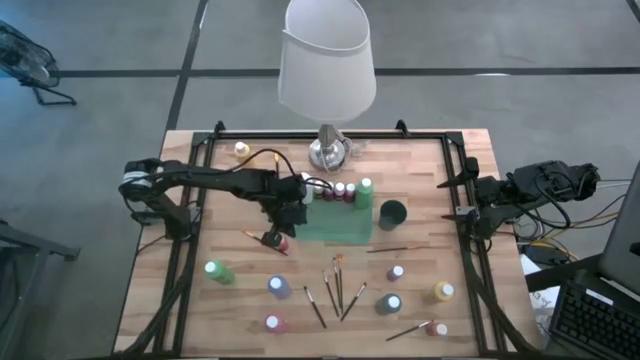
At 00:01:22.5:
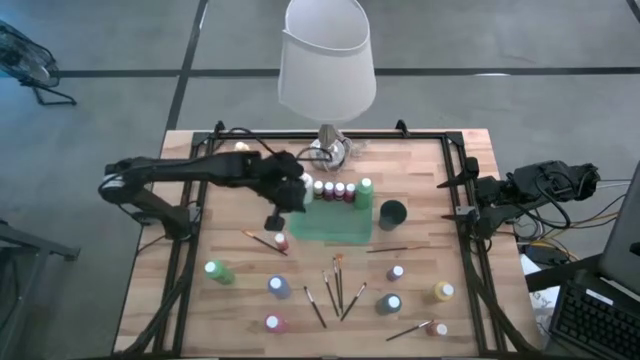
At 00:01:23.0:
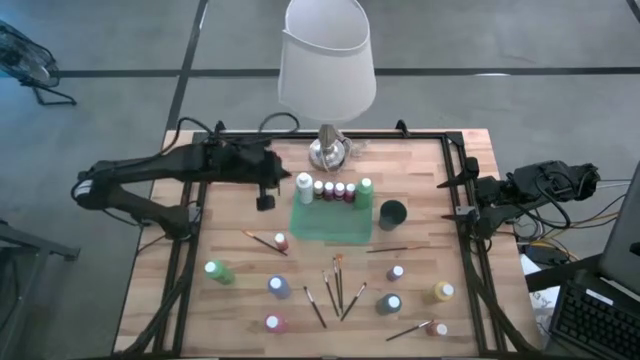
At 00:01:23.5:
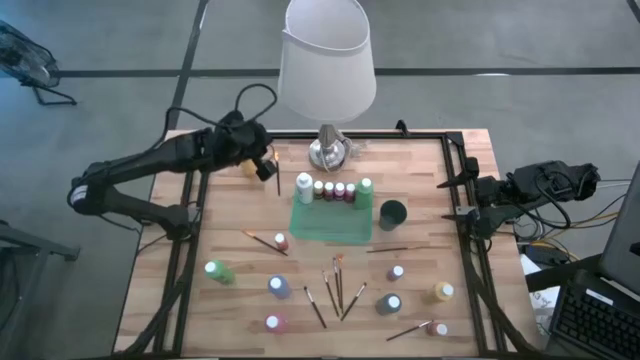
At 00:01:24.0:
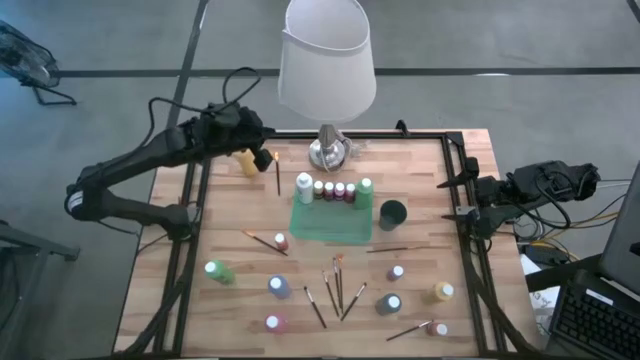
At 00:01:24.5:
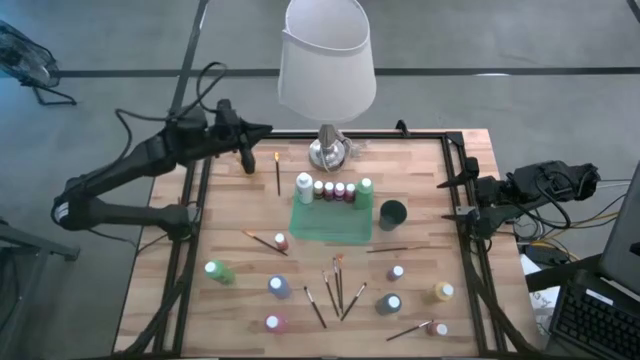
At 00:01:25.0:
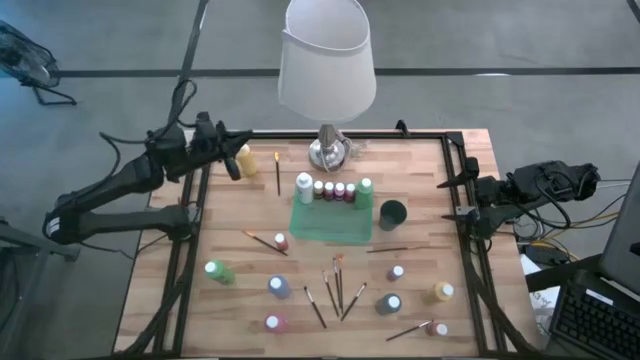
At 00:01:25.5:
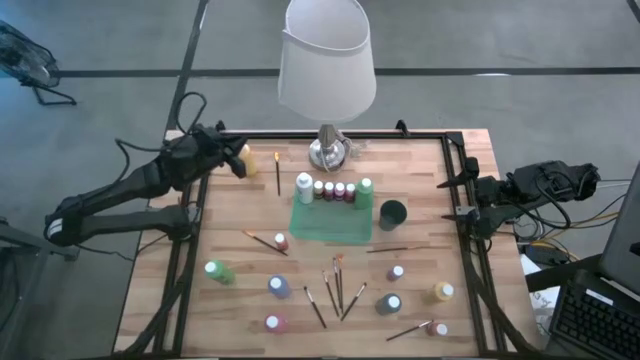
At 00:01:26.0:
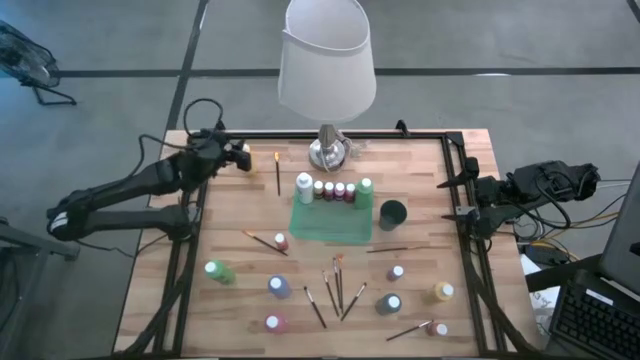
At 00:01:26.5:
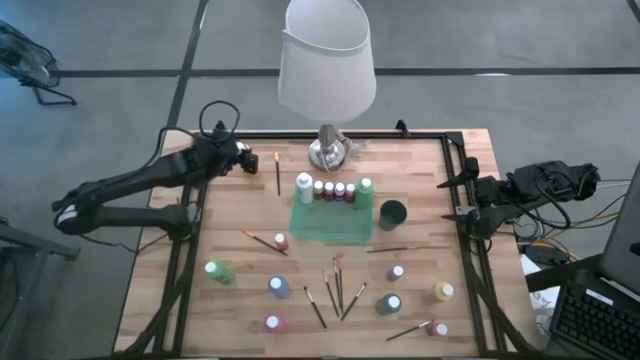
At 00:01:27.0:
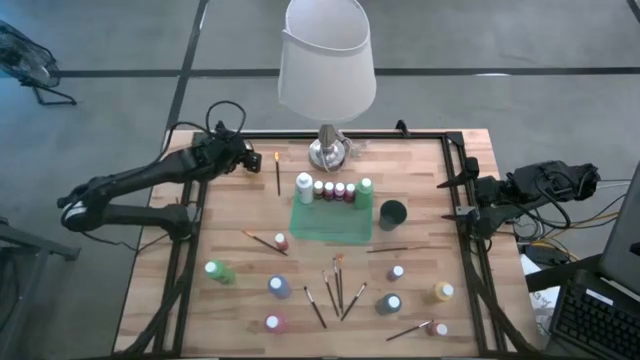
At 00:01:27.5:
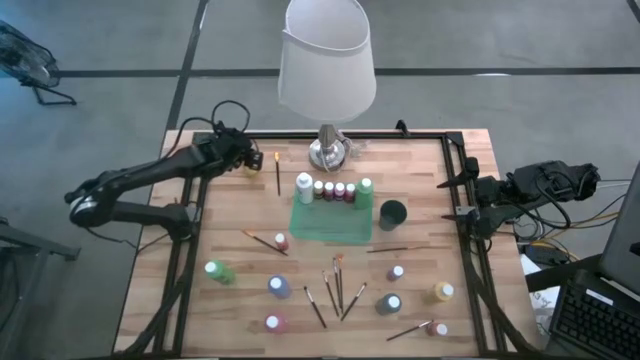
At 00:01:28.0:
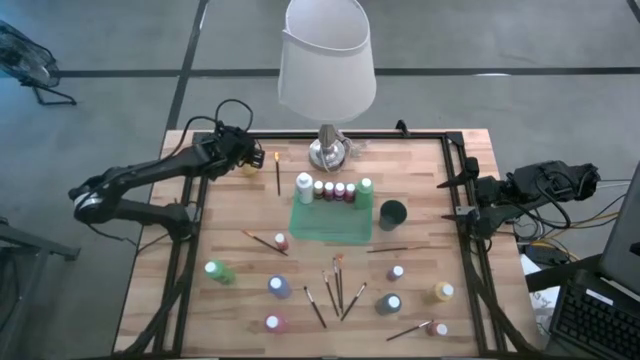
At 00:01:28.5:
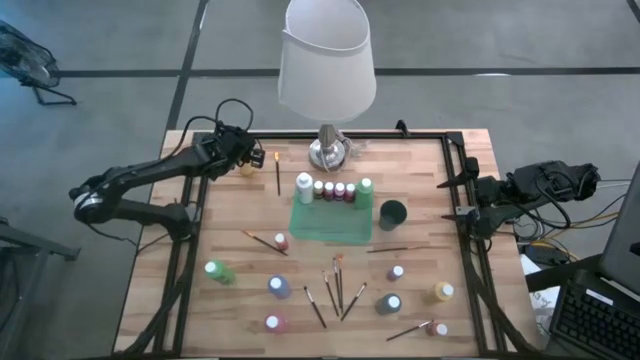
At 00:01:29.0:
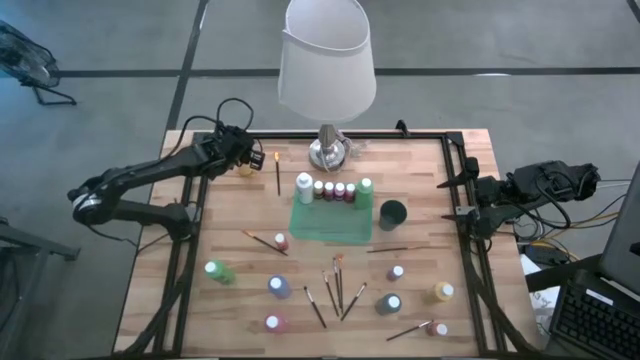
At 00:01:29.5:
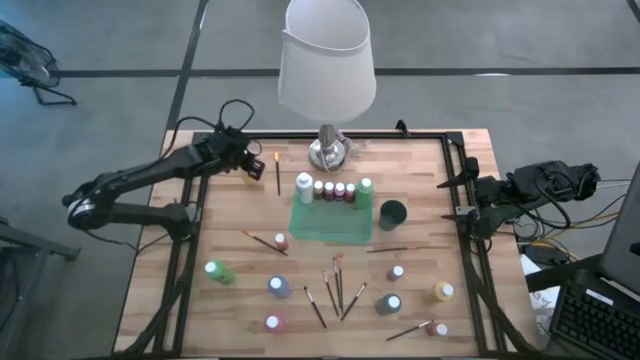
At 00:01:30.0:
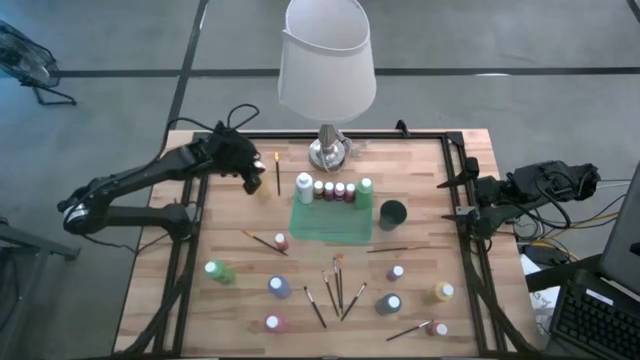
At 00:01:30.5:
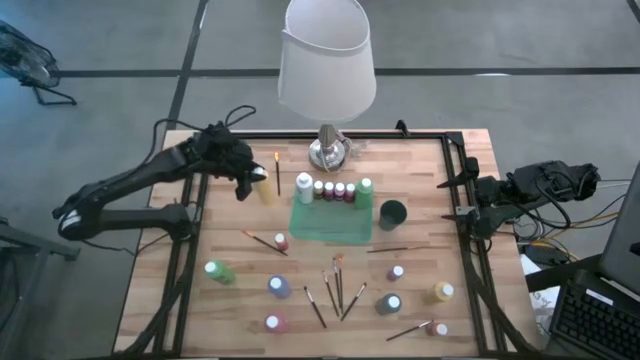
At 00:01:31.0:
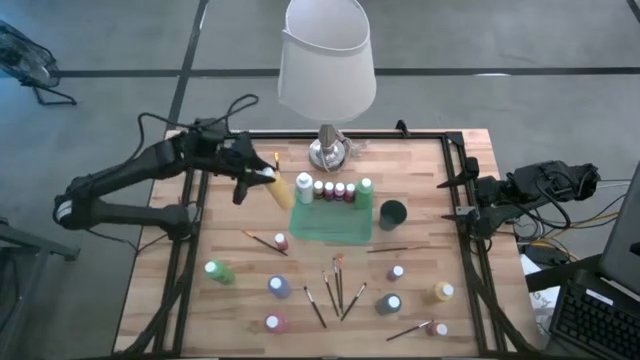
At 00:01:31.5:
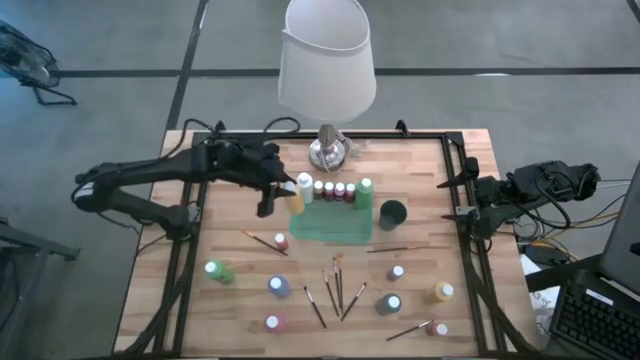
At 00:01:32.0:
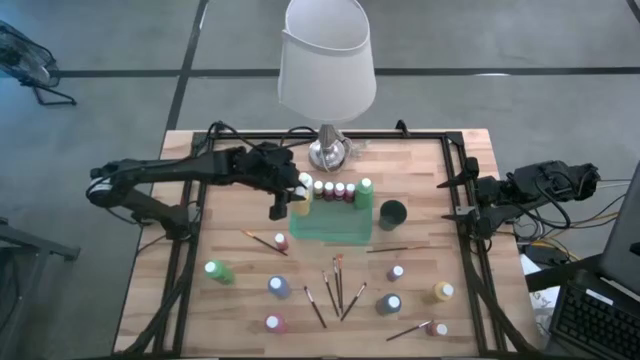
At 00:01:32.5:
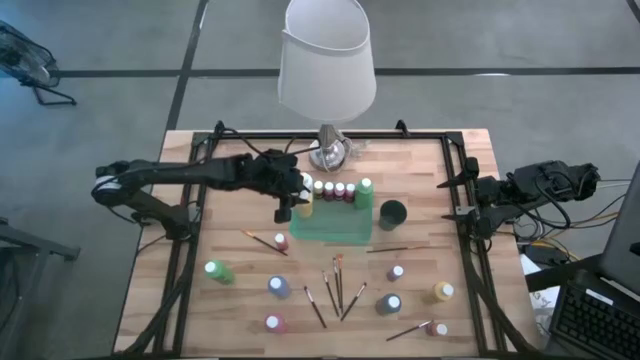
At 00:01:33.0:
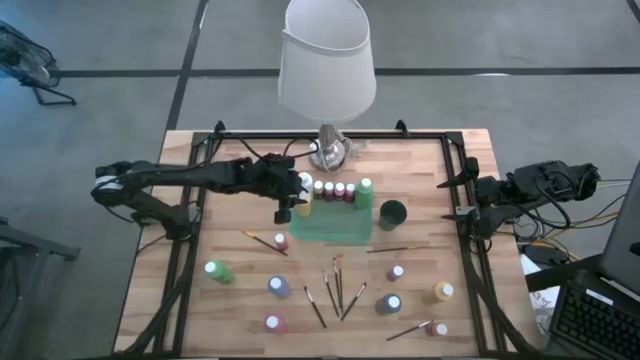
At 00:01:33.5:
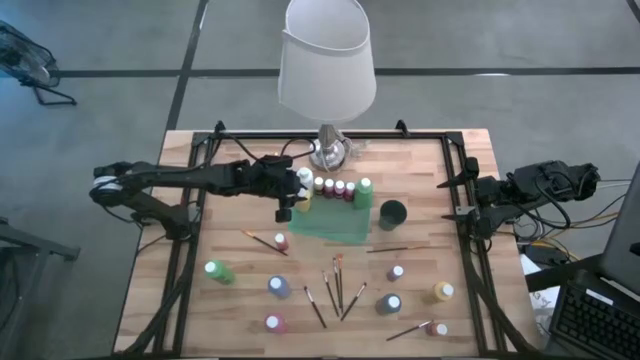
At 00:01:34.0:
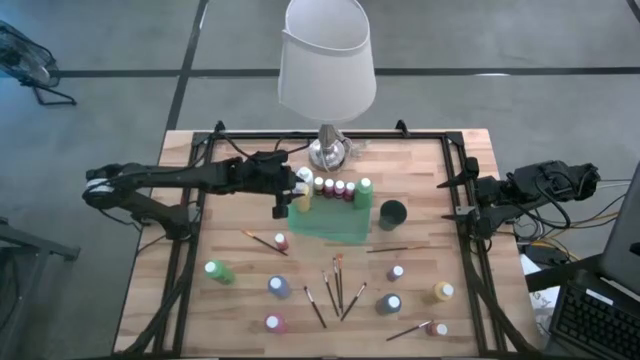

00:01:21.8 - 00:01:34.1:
Task: Pick & Place Paint Supplies
Put the yellow paint bottle into the green bin

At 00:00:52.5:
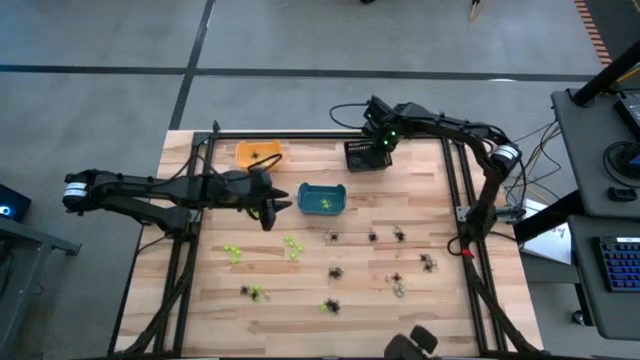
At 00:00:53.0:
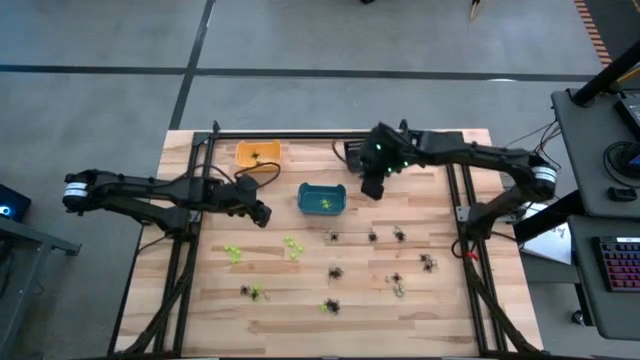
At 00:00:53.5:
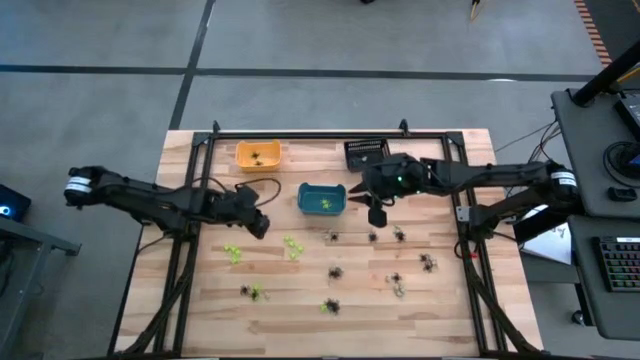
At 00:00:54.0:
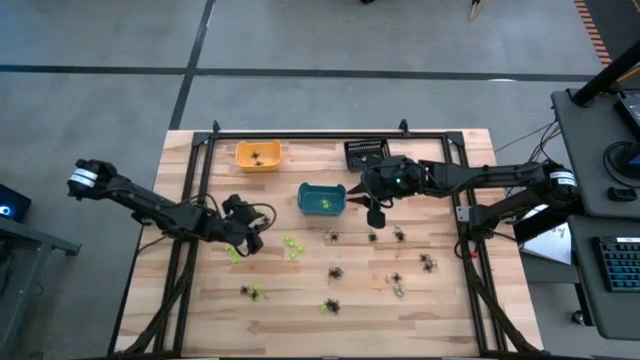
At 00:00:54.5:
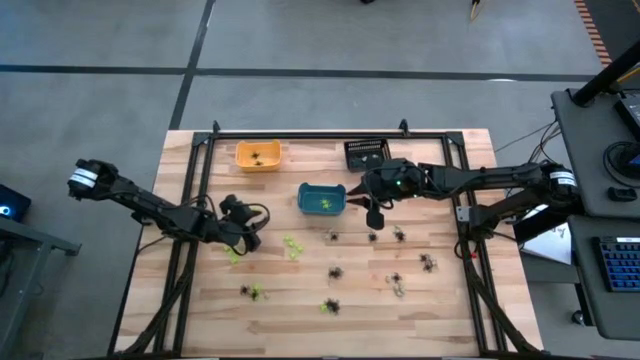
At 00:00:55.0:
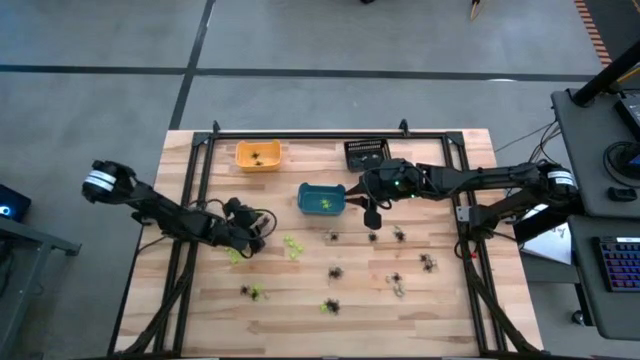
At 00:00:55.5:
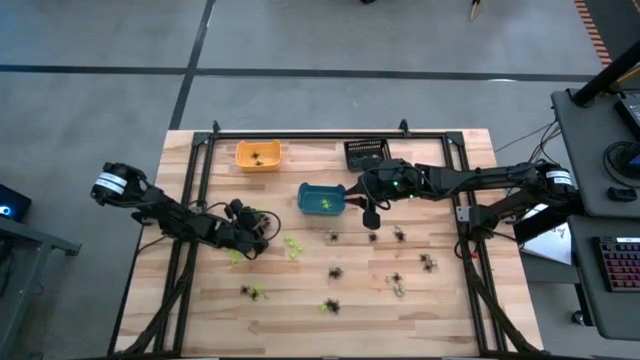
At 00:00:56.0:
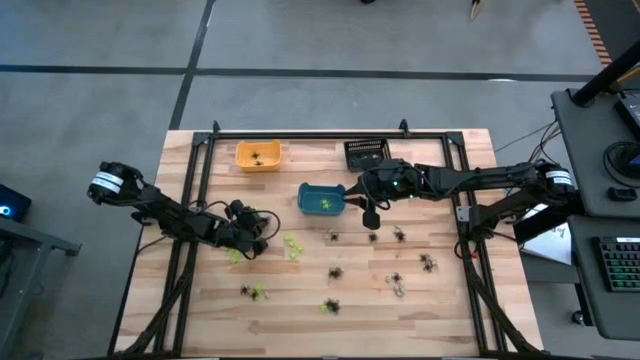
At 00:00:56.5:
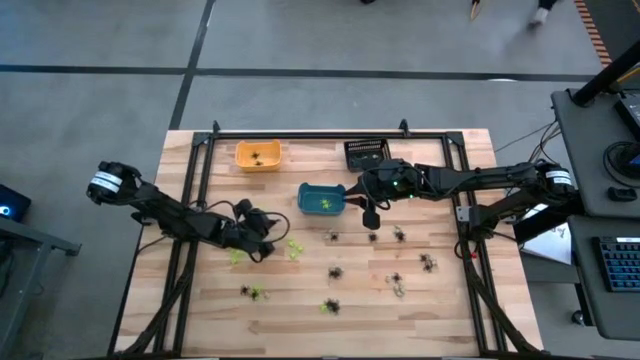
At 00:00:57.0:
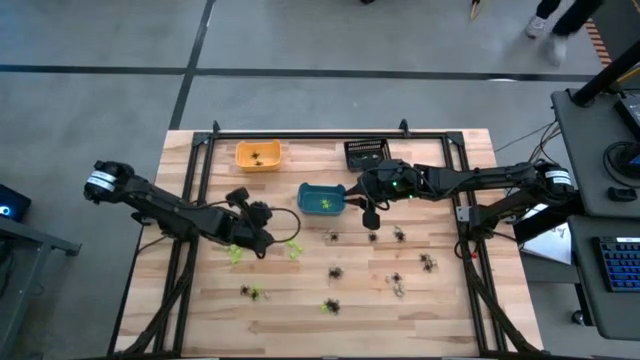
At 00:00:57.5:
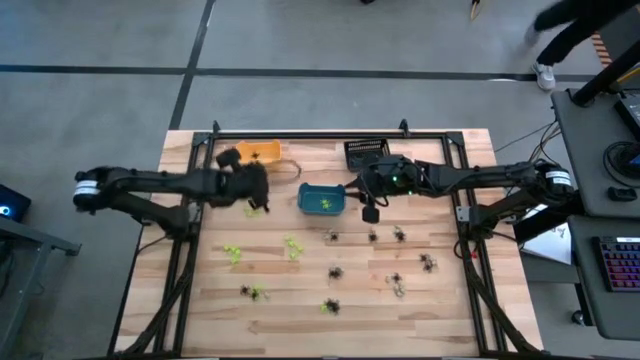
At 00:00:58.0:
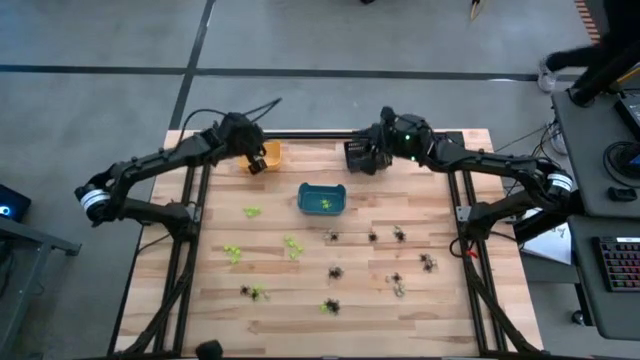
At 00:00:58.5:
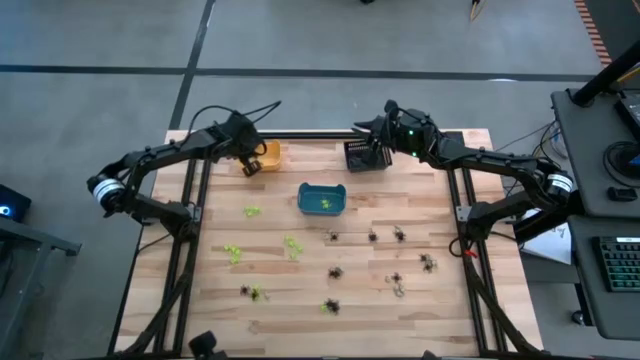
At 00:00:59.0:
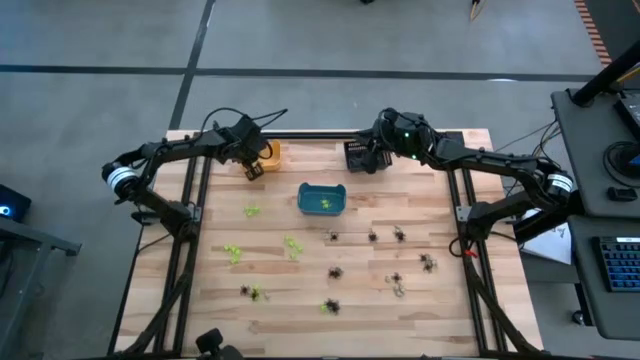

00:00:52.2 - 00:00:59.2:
Task: Sort Halloween decoration
Put the black spider toy into the yellow bin
